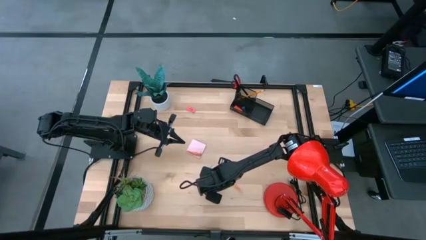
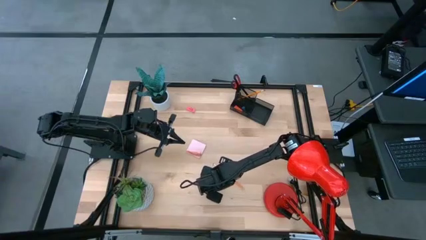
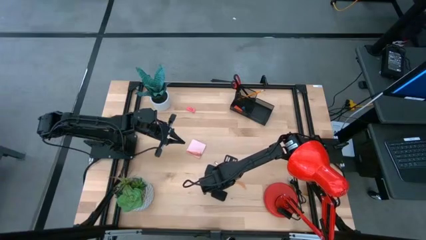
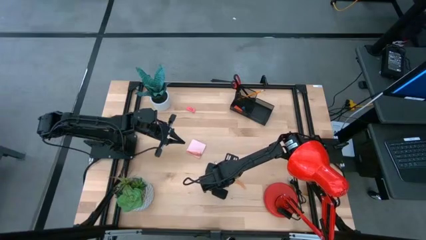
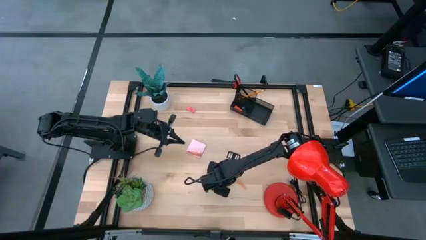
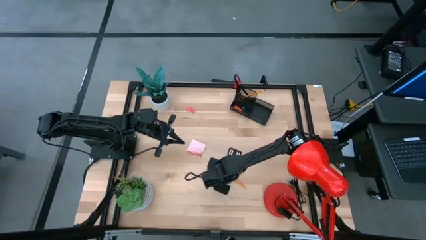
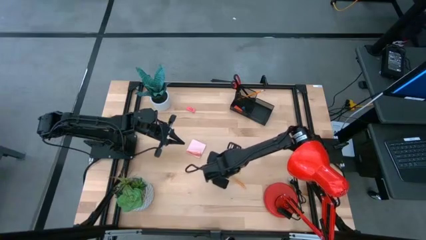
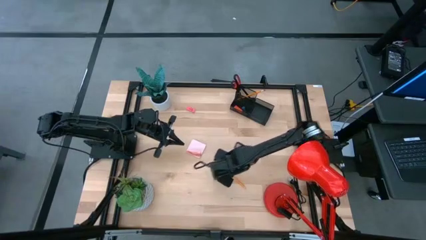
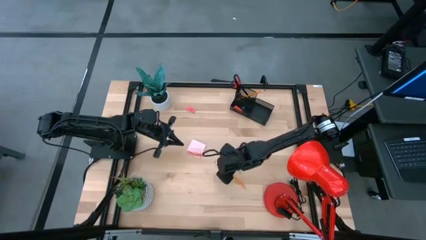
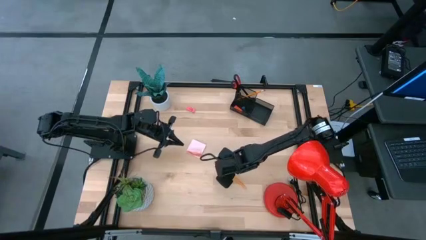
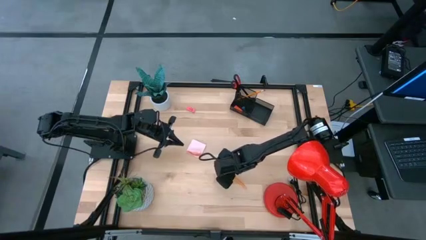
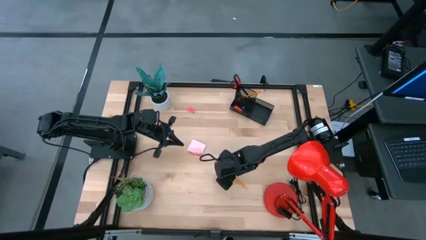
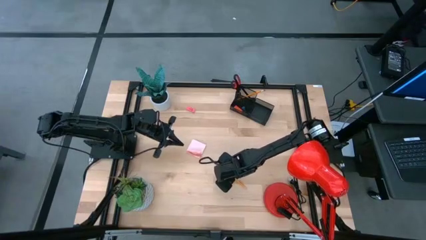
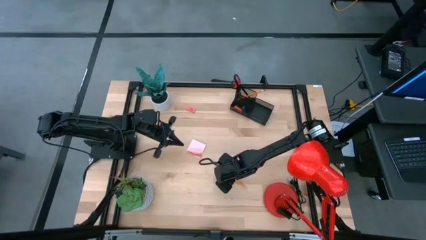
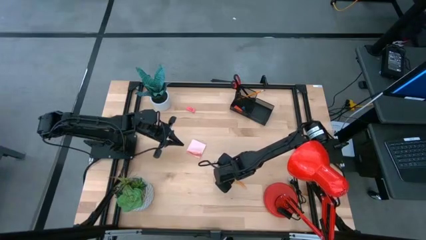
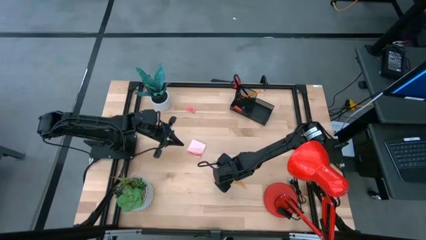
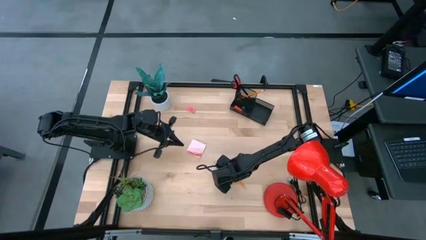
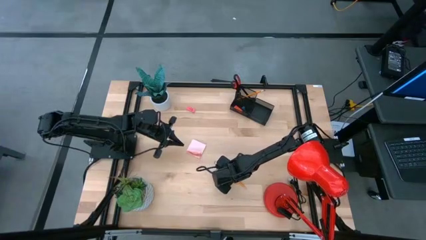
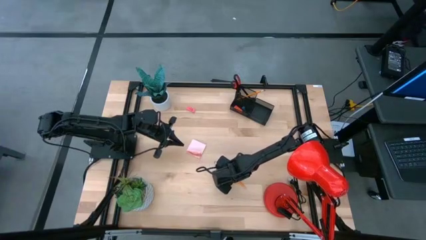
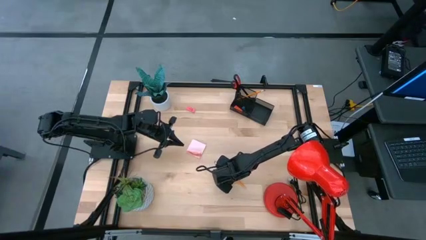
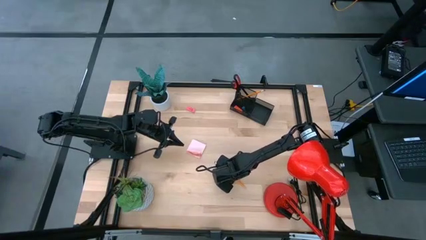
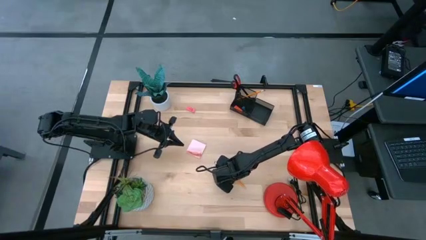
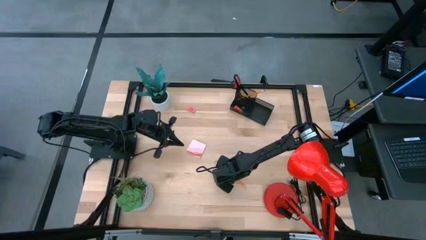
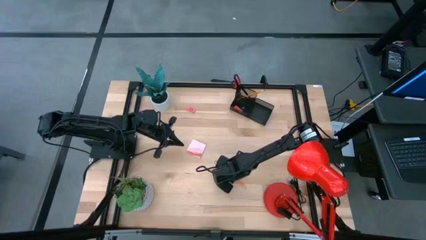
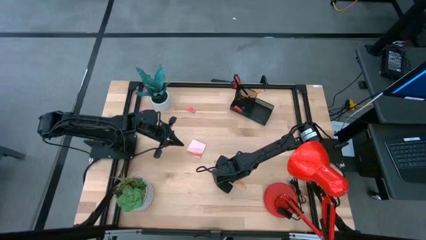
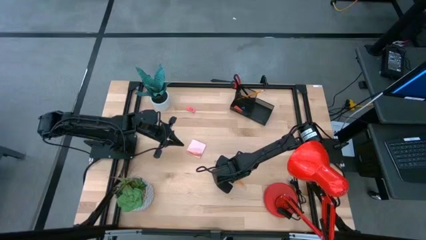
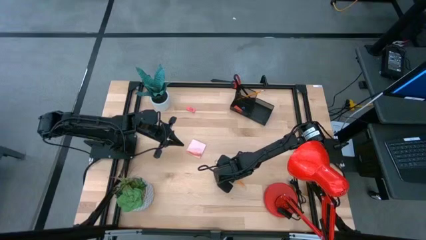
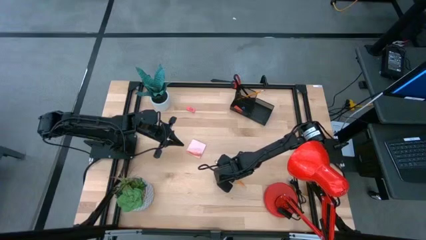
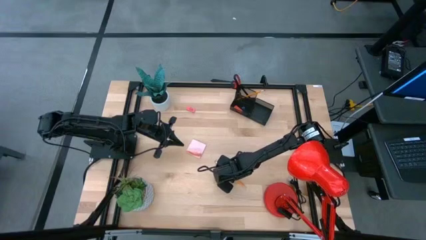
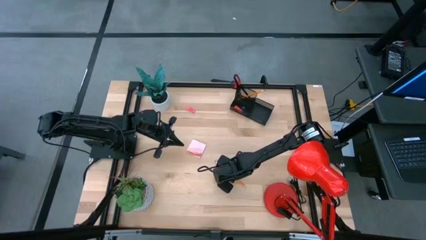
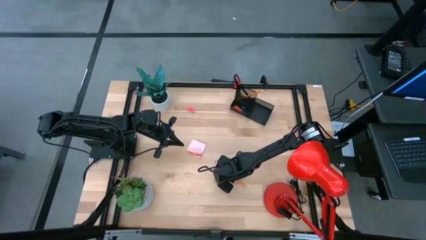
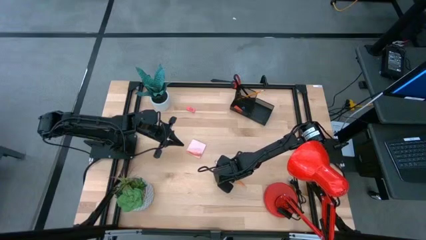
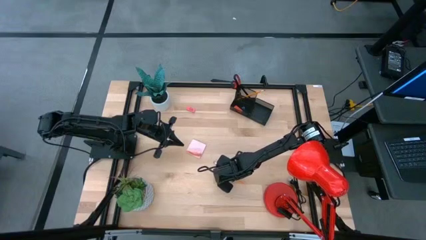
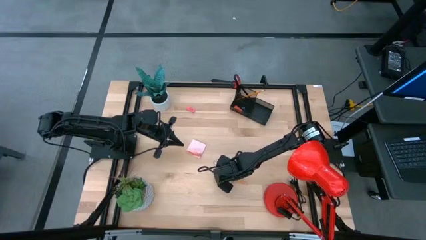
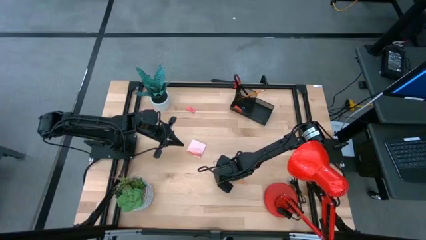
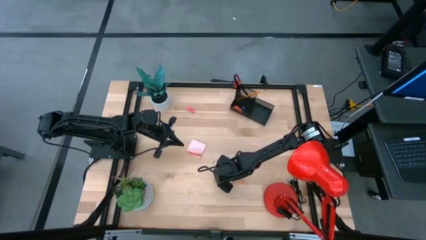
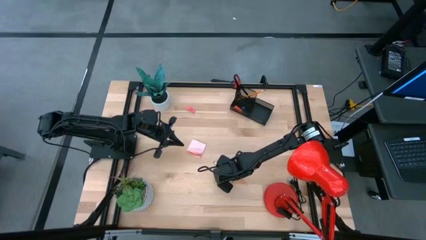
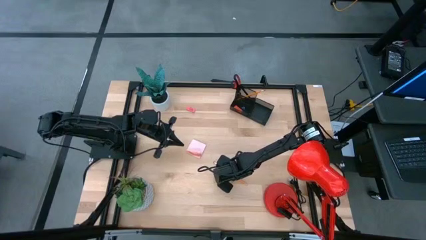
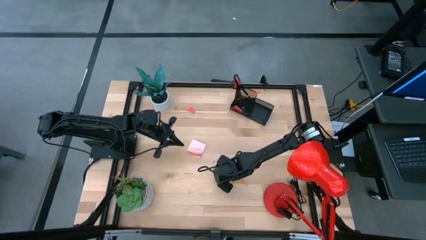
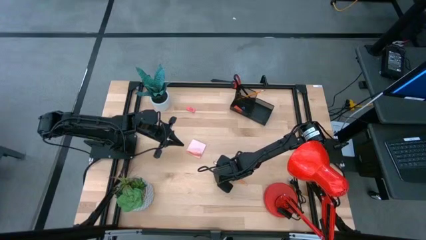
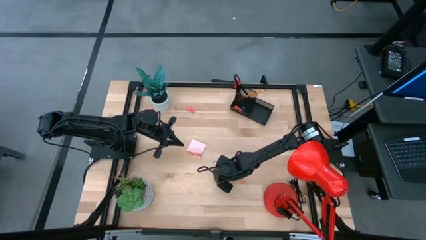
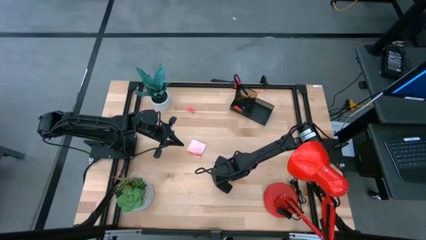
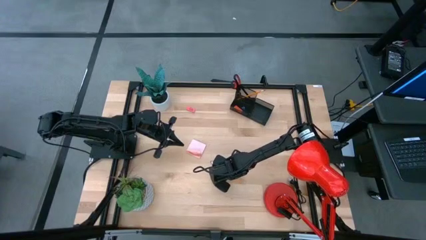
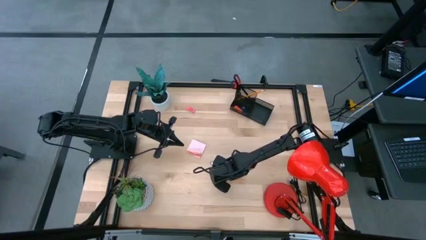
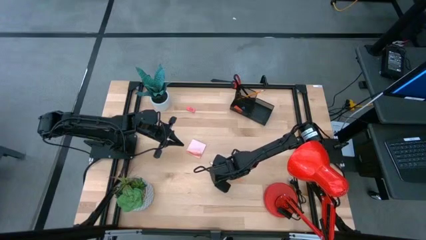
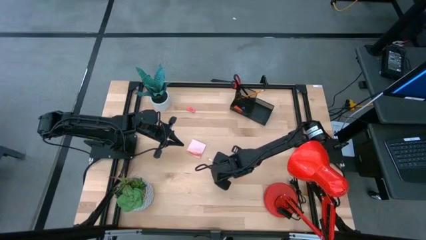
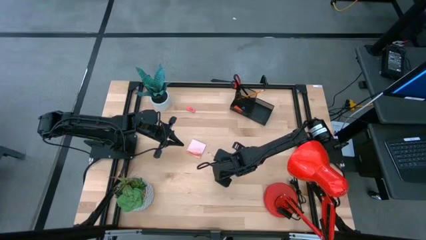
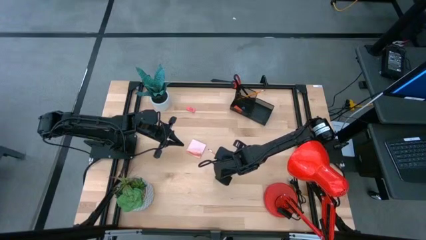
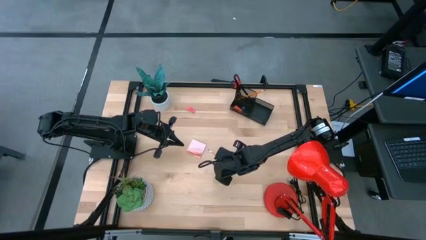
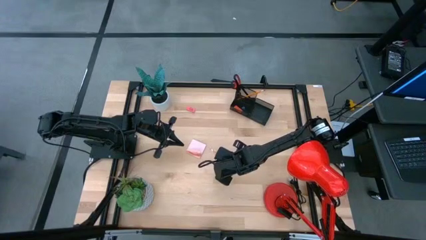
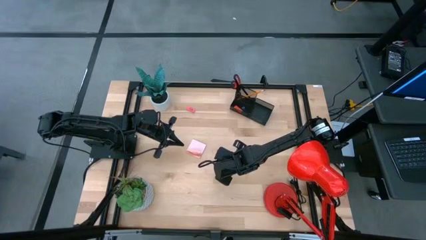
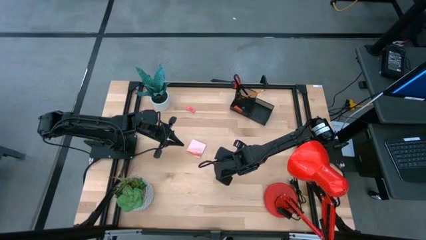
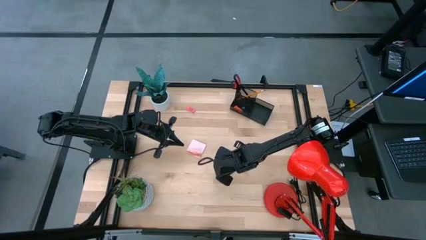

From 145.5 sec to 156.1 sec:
Task: Pick and place office supplies into organizer
Put the pencil into the black desk organizer
